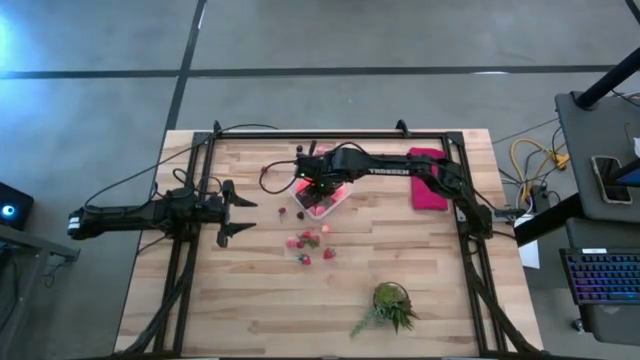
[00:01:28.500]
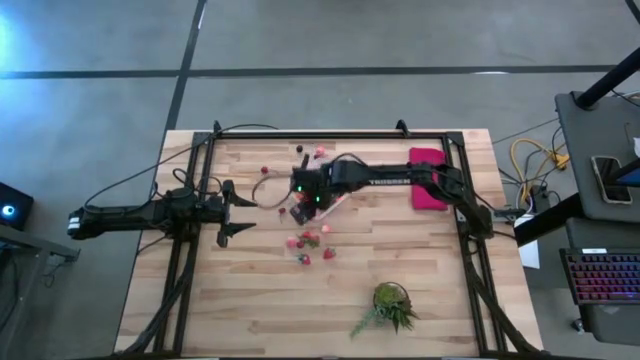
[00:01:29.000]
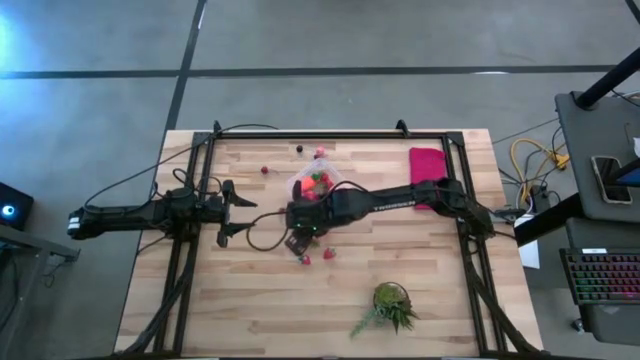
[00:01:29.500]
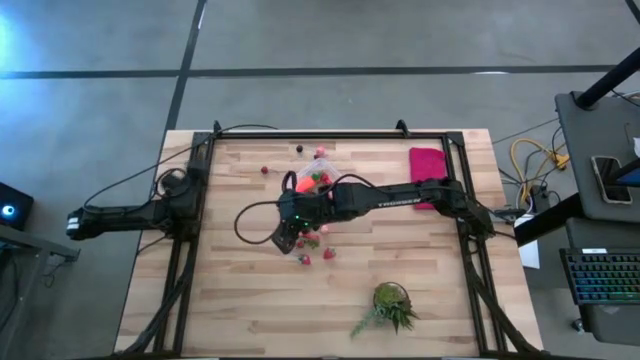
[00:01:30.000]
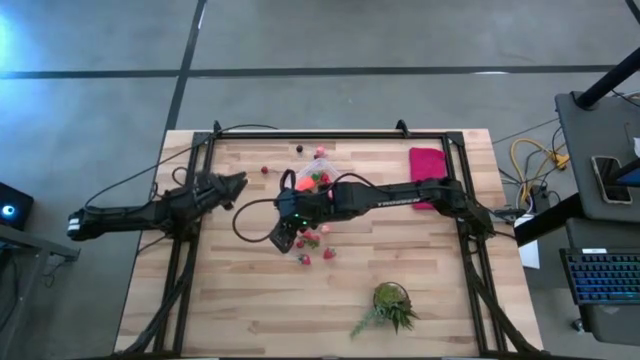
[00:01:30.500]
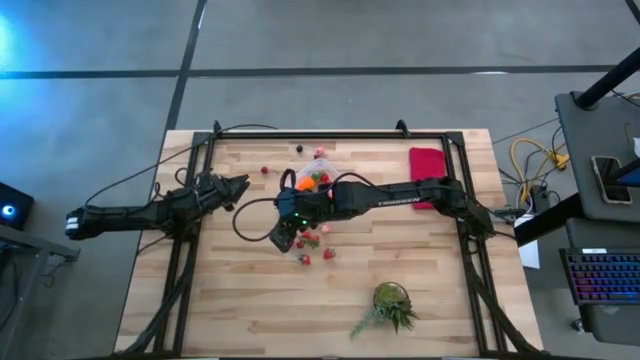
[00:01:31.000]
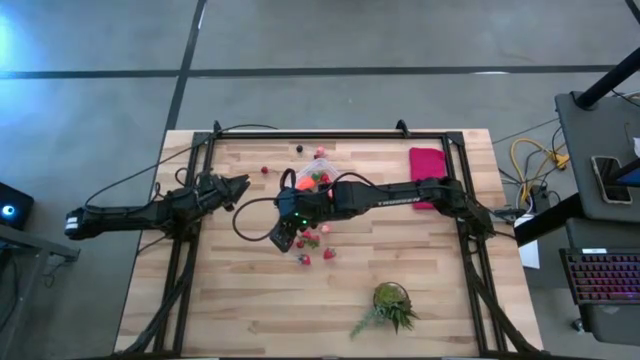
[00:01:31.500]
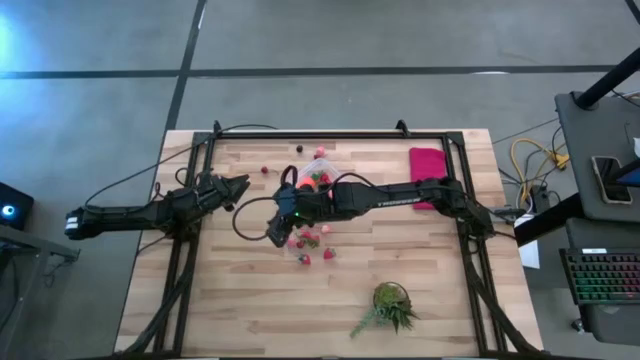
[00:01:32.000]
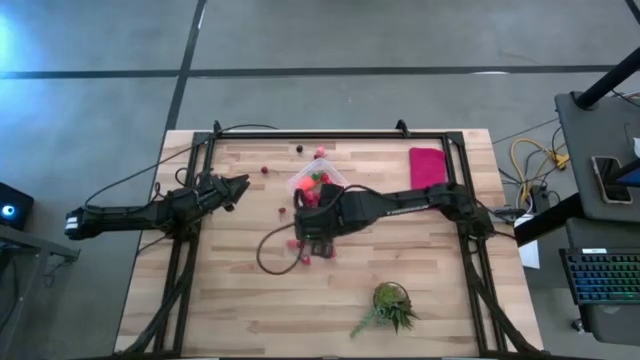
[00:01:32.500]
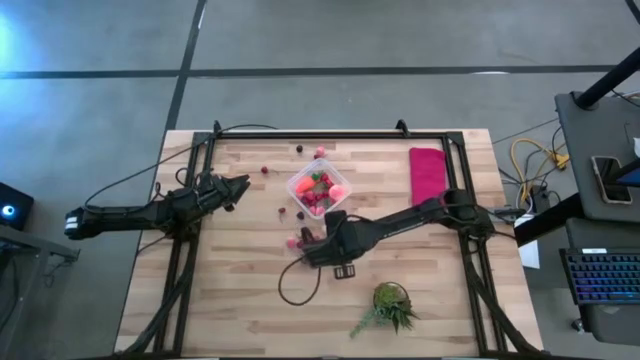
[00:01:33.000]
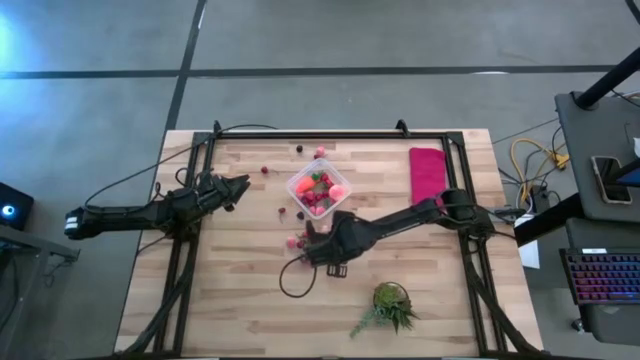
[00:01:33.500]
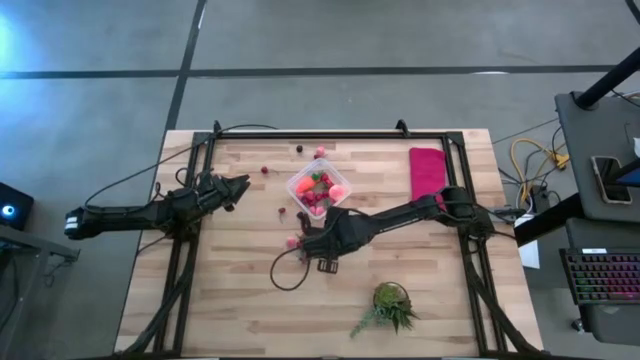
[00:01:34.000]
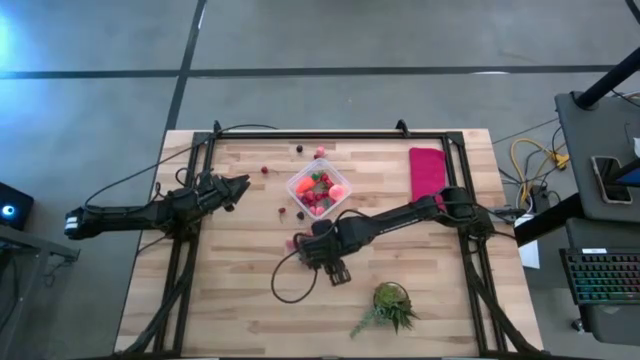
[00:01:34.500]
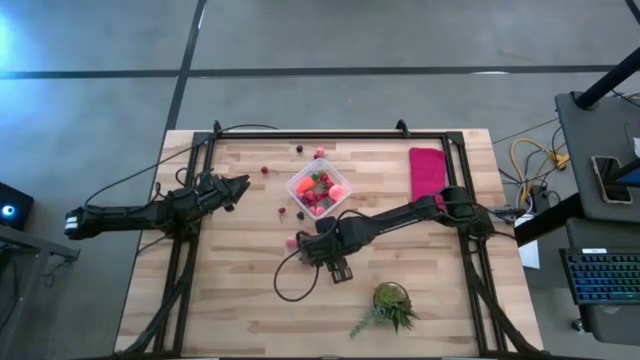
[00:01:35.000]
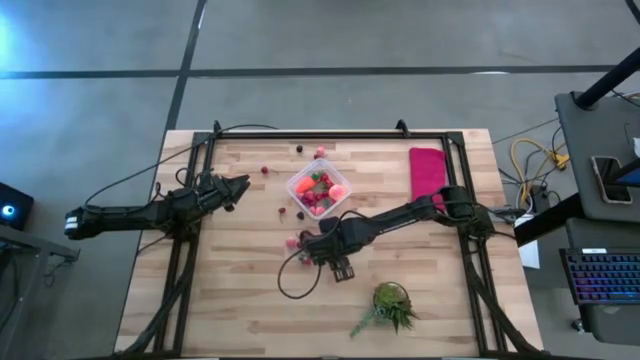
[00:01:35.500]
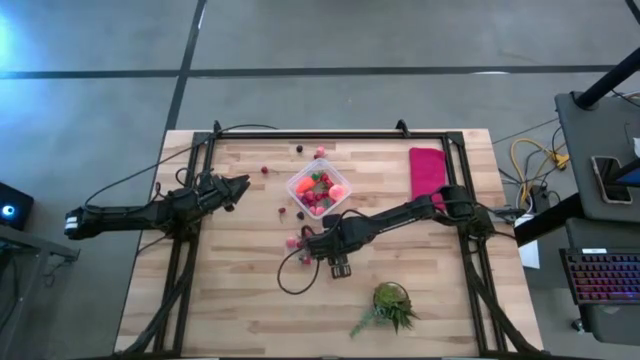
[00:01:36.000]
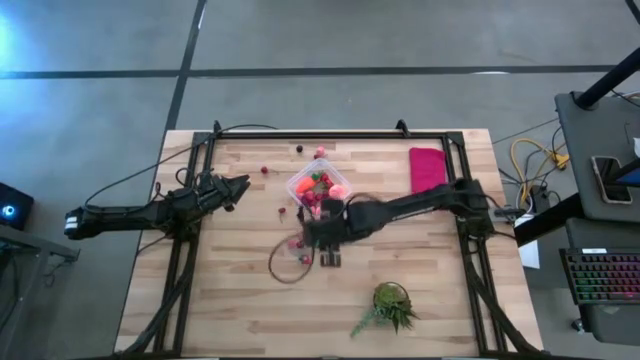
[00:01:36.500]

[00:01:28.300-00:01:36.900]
Task: Pick and placing Produce into tupperware
Put the red strawberry into the transparent container

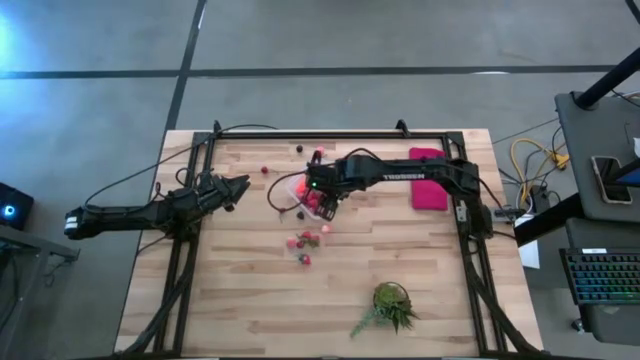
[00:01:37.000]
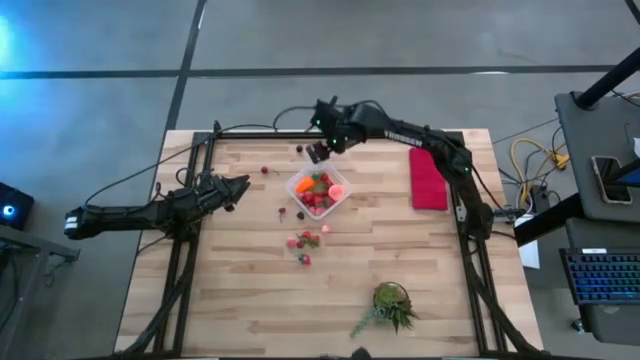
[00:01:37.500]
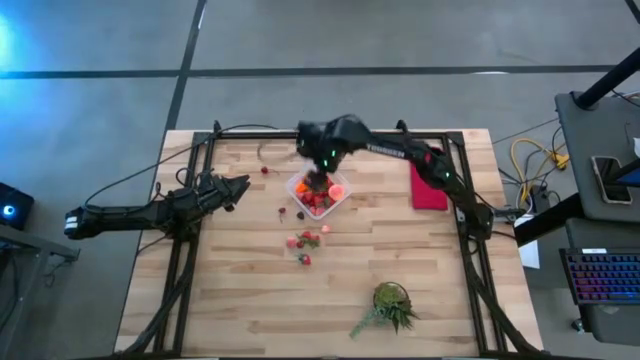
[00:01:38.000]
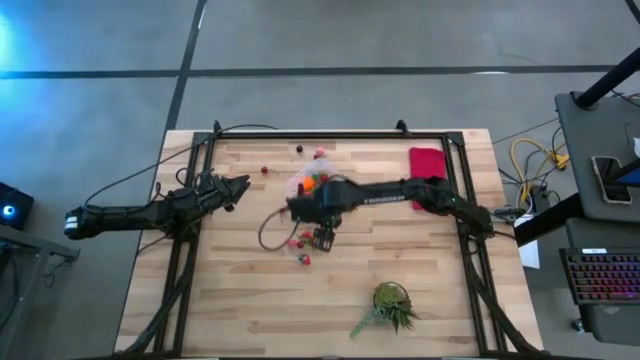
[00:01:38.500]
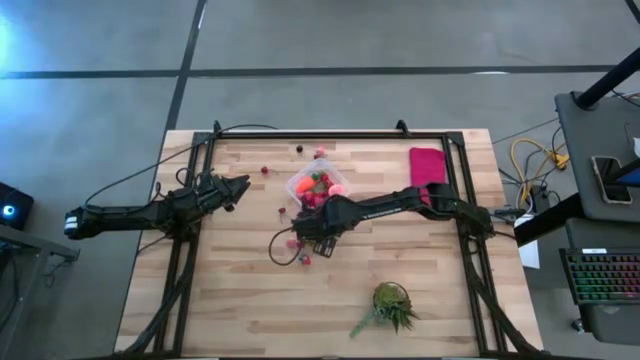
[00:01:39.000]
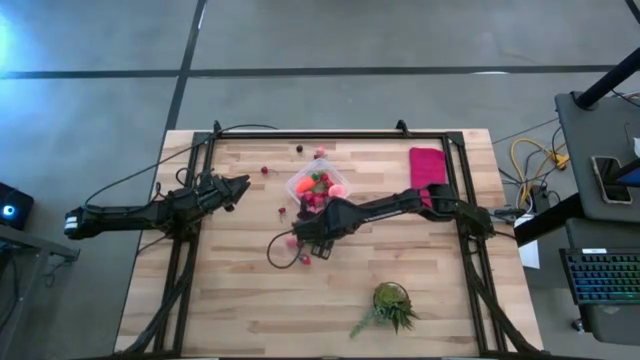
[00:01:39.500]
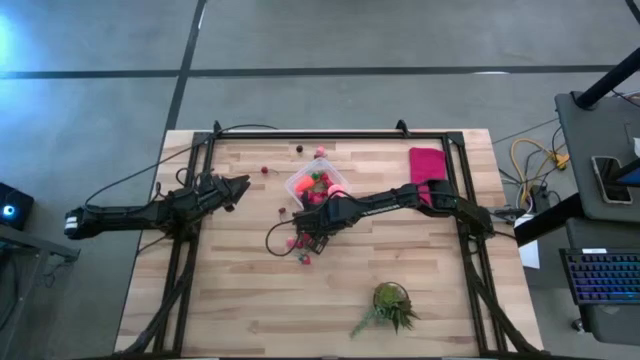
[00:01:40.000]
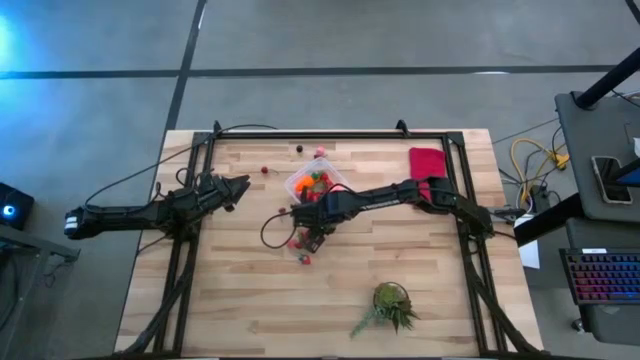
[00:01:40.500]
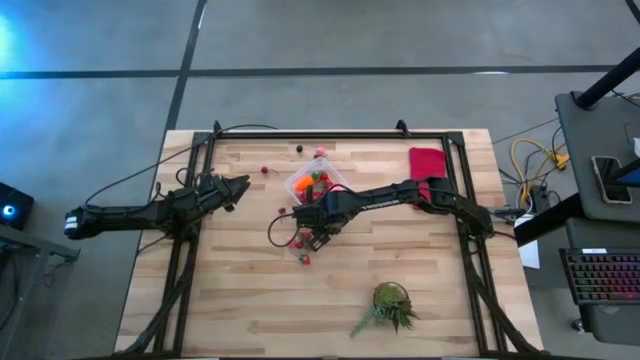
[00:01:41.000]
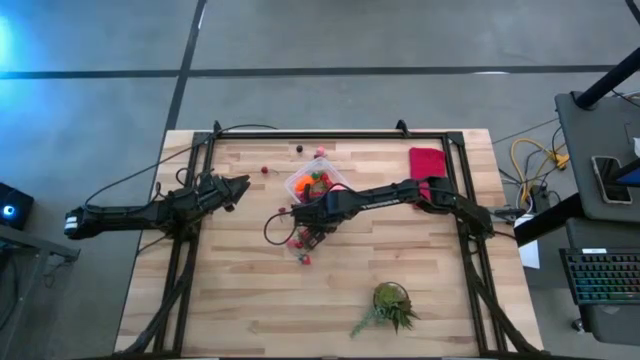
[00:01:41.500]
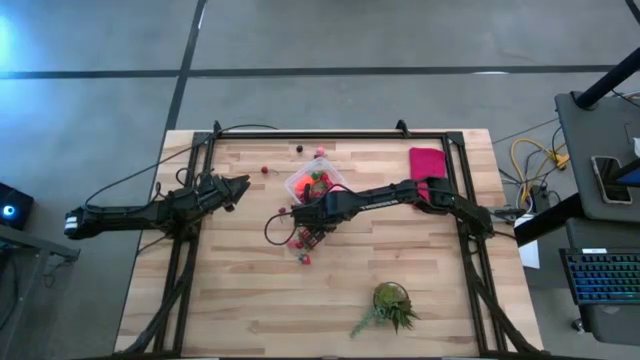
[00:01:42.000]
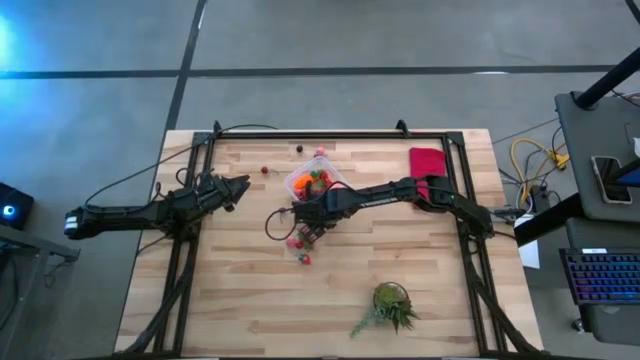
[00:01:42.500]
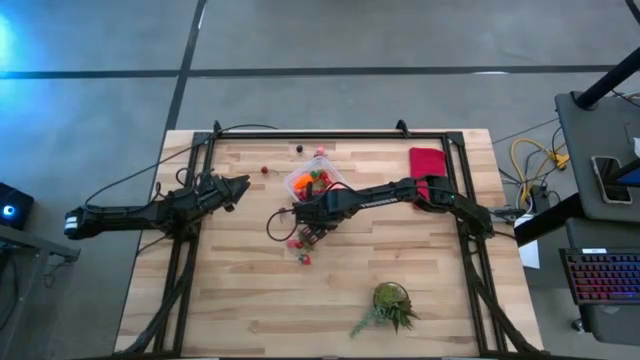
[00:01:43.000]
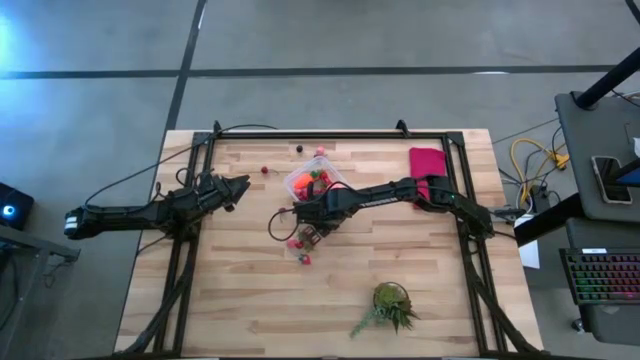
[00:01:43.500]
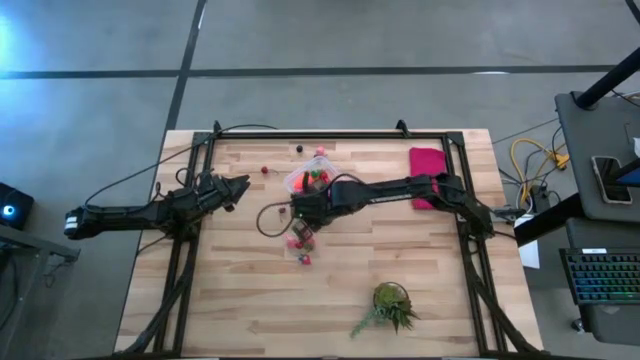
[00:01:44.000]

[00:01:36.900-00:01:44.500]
Put the pink apricot into the transparent container

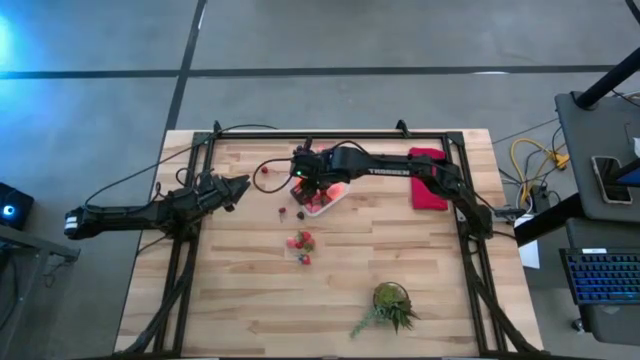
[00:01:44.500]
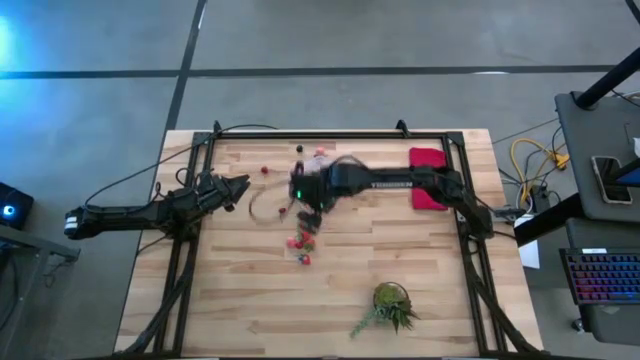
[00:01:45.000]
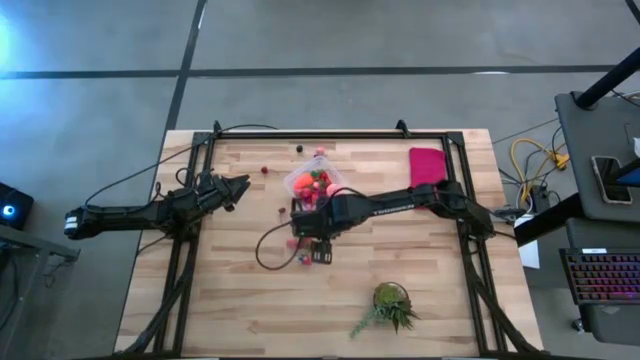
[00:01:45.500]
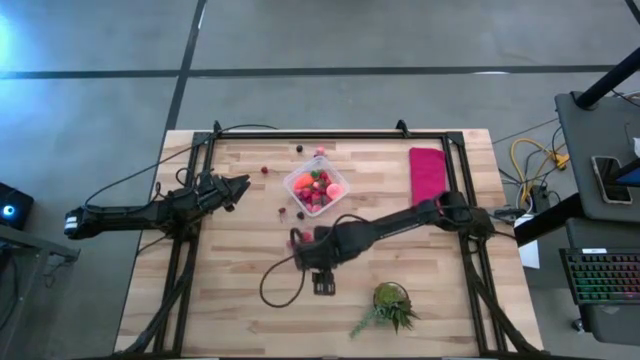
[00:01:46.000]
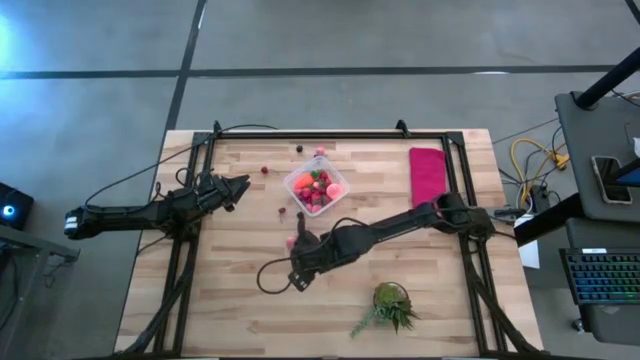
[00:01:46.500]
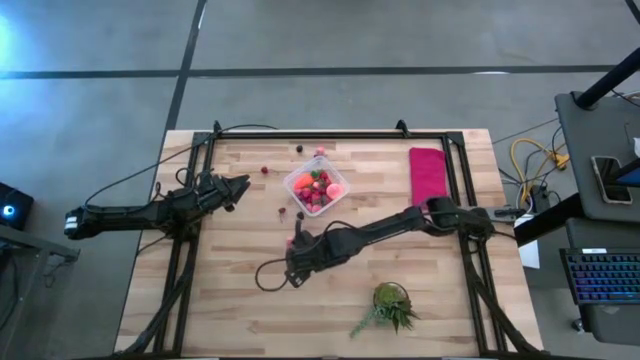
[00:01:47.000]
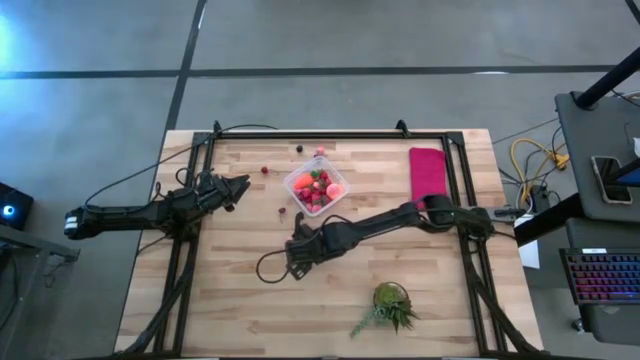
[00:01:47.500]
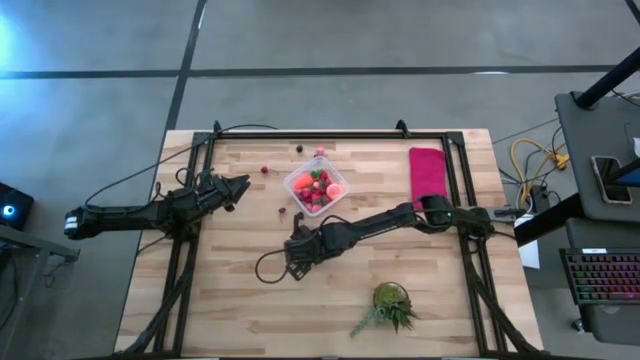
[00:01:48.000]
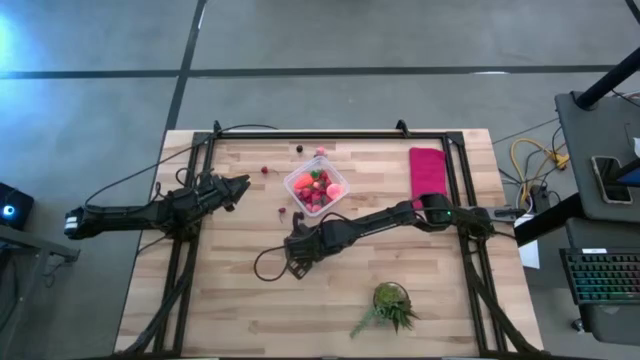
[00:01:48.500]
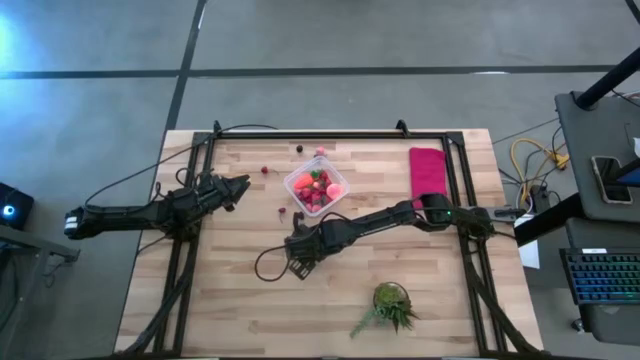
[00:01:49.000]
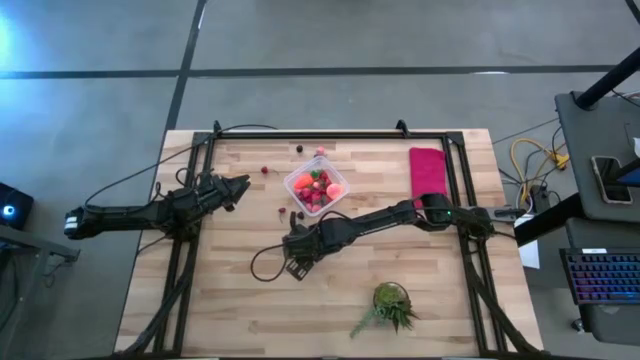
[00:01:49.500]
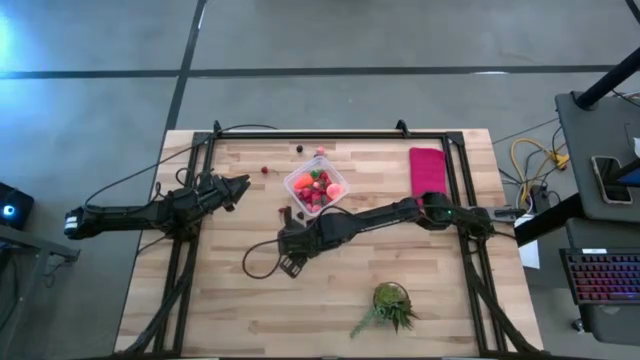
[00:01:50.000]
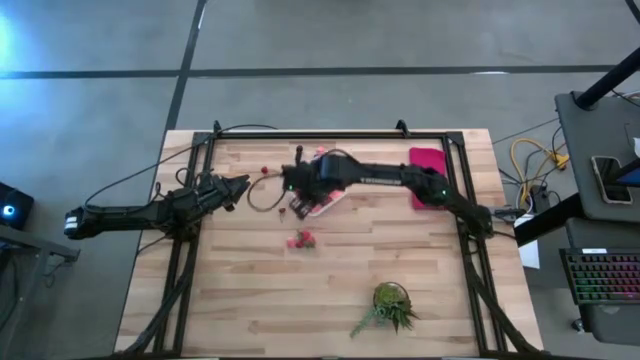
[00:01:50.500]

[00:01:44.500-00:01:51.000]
Put the red strawberry into the transparent container
